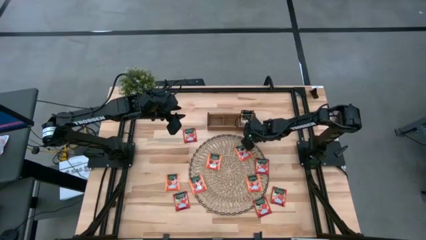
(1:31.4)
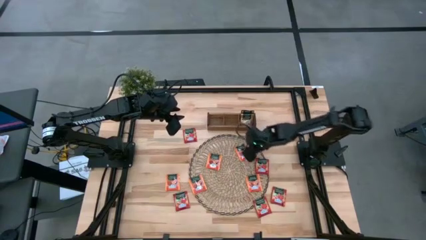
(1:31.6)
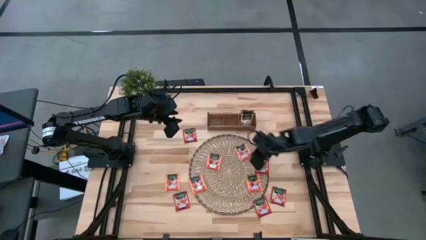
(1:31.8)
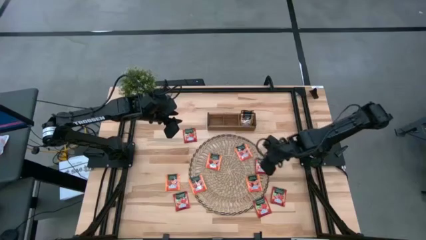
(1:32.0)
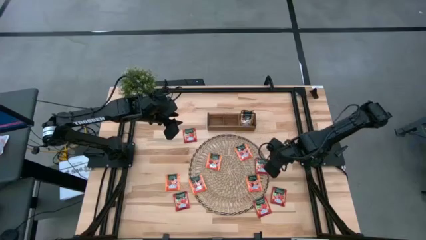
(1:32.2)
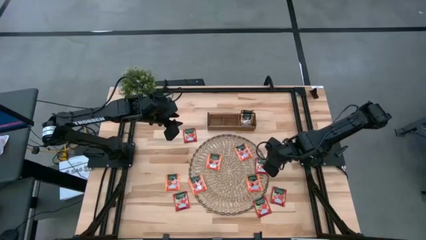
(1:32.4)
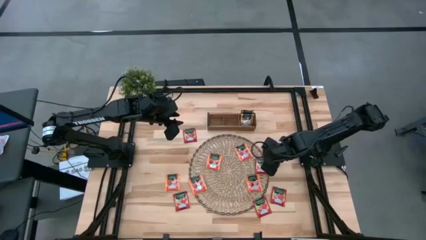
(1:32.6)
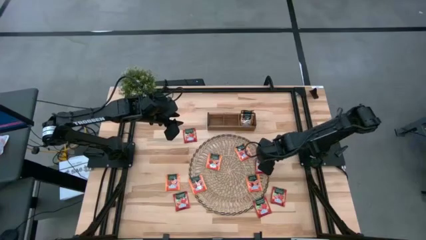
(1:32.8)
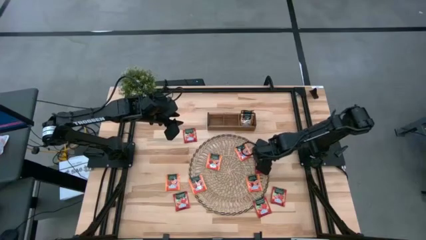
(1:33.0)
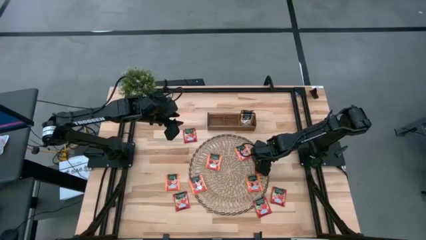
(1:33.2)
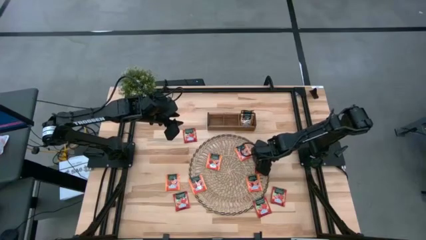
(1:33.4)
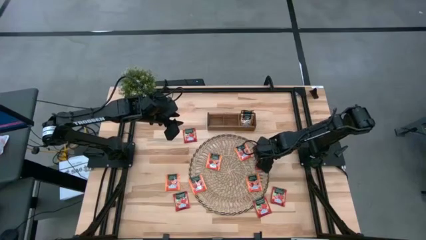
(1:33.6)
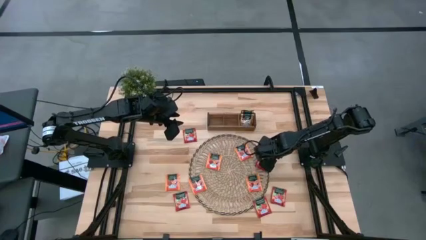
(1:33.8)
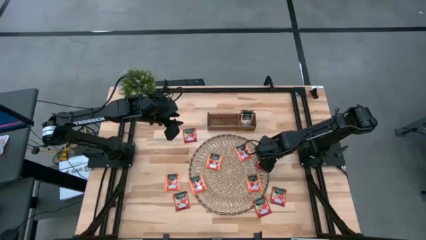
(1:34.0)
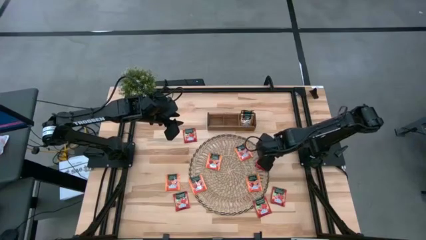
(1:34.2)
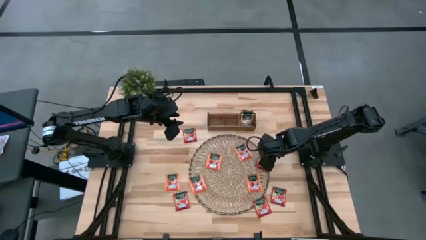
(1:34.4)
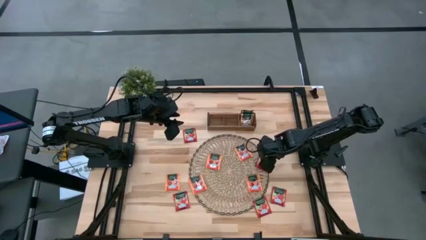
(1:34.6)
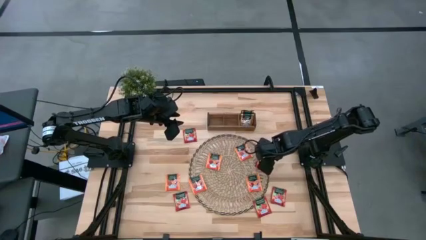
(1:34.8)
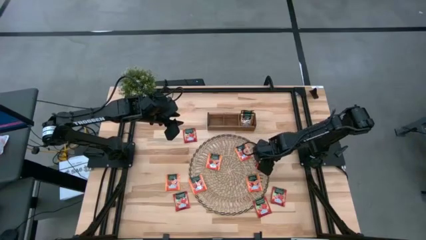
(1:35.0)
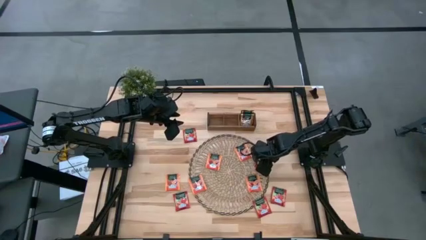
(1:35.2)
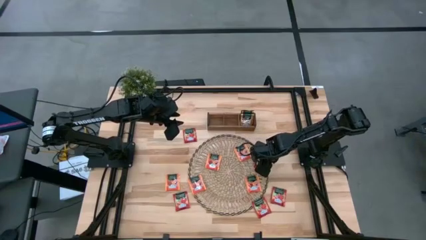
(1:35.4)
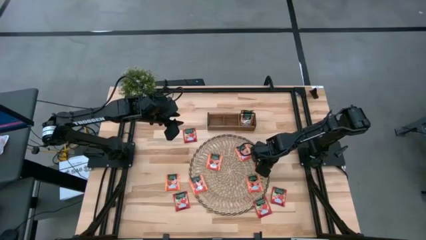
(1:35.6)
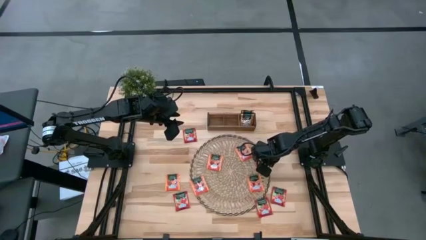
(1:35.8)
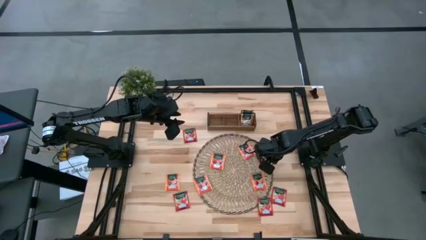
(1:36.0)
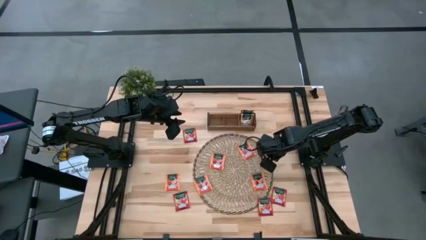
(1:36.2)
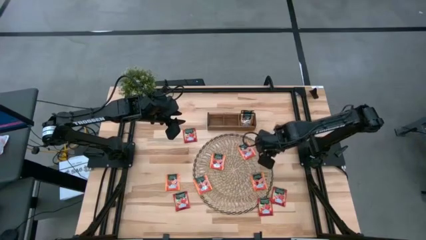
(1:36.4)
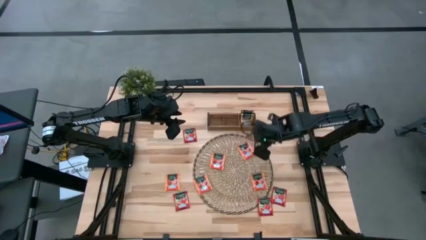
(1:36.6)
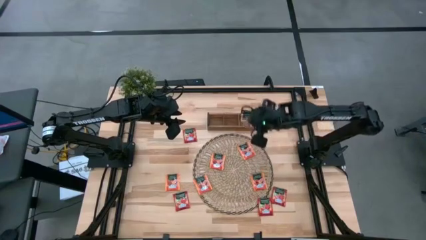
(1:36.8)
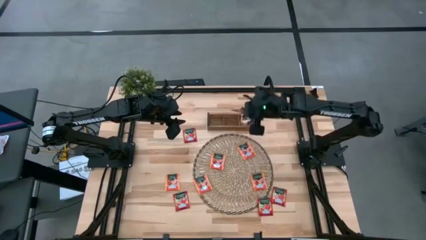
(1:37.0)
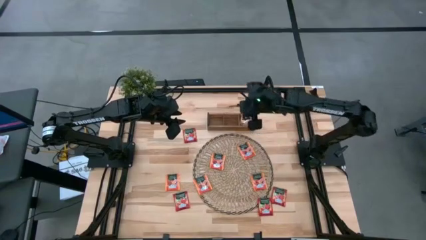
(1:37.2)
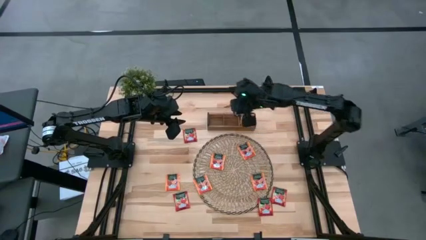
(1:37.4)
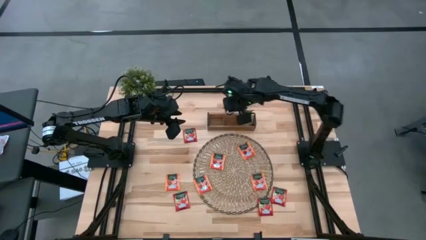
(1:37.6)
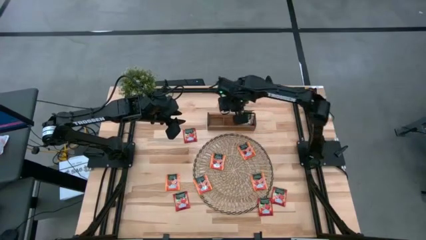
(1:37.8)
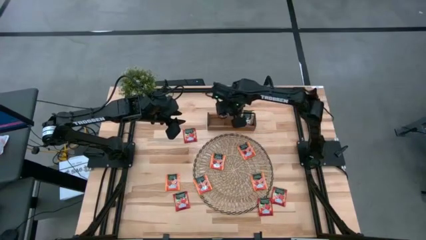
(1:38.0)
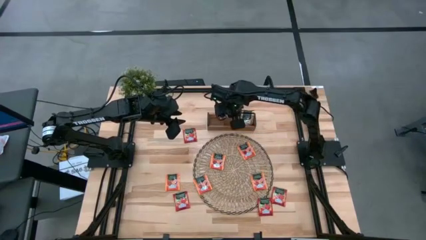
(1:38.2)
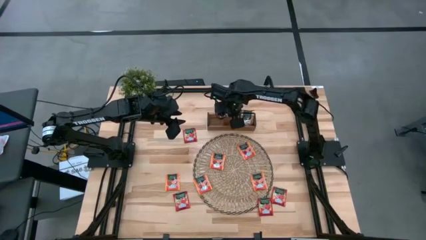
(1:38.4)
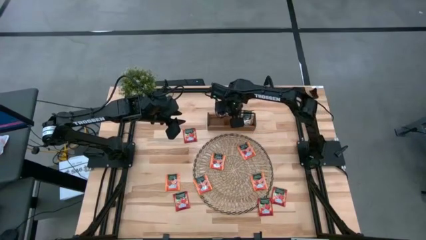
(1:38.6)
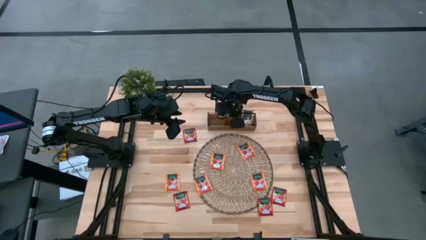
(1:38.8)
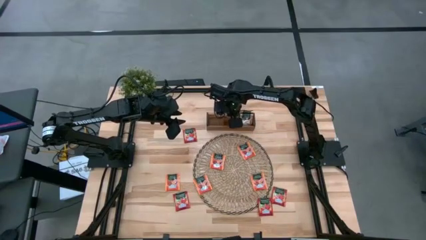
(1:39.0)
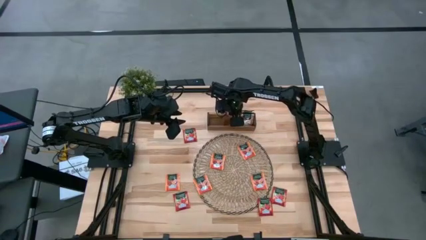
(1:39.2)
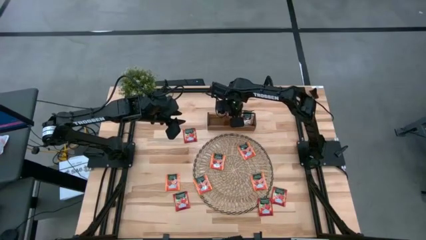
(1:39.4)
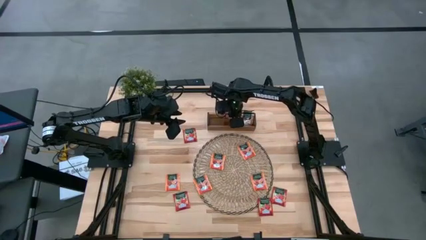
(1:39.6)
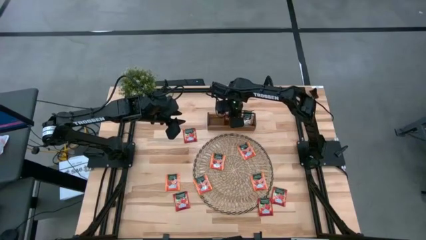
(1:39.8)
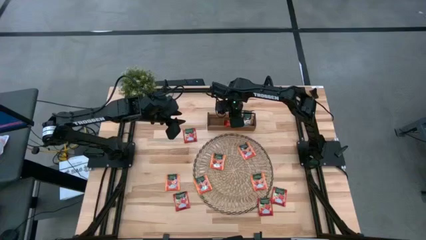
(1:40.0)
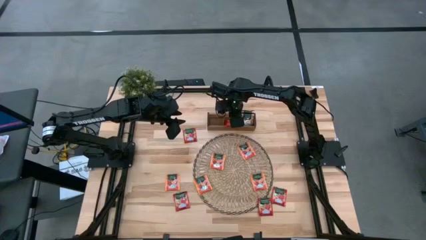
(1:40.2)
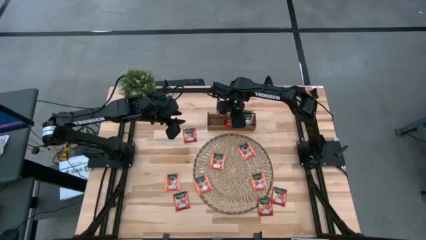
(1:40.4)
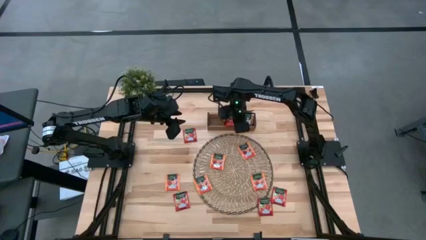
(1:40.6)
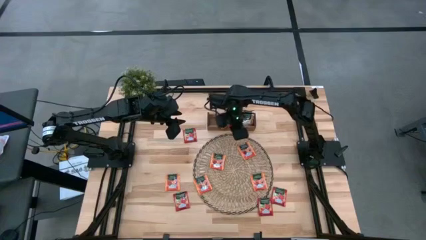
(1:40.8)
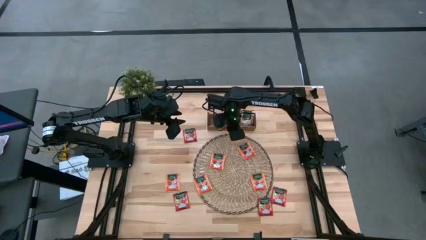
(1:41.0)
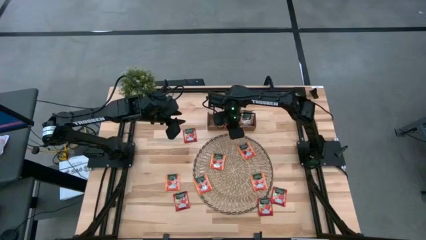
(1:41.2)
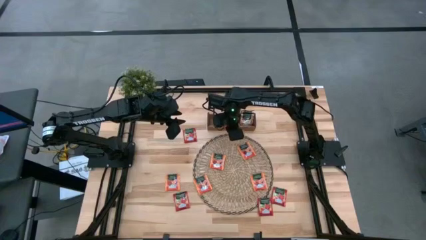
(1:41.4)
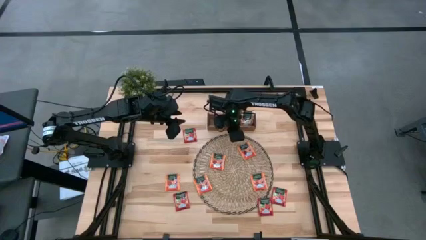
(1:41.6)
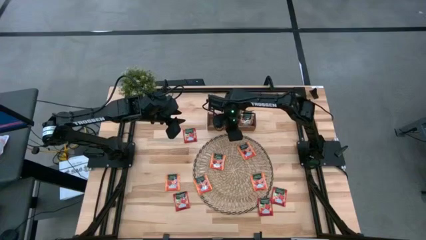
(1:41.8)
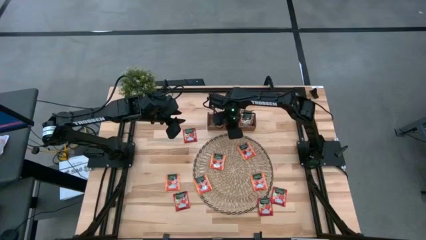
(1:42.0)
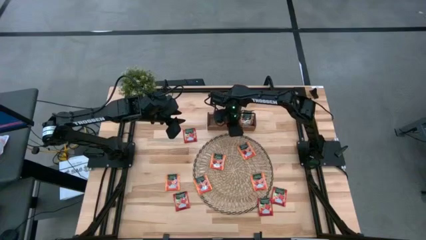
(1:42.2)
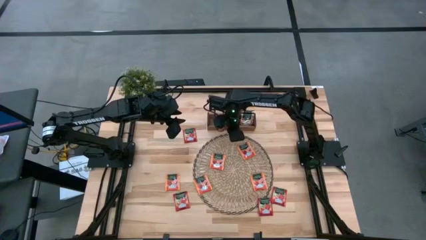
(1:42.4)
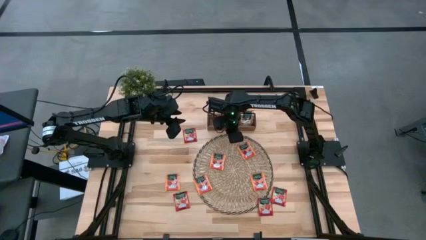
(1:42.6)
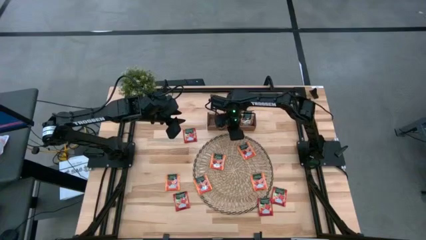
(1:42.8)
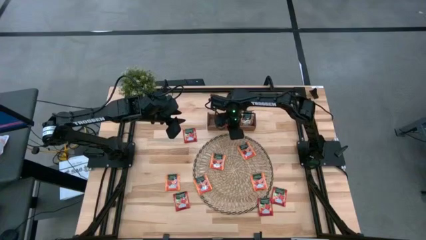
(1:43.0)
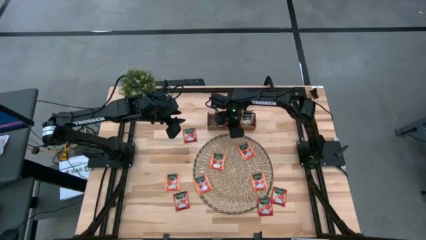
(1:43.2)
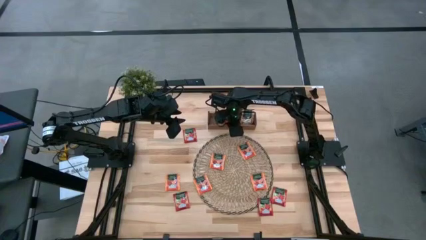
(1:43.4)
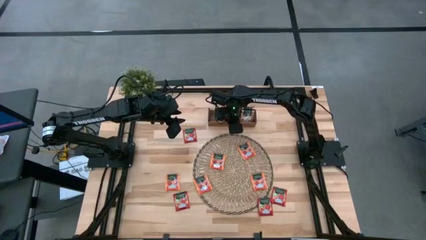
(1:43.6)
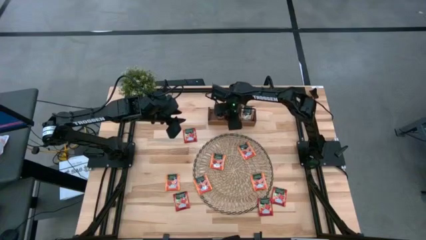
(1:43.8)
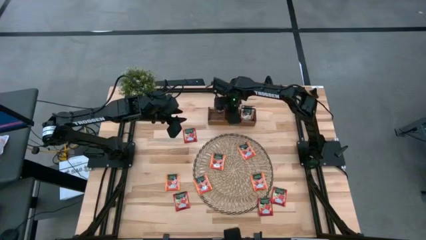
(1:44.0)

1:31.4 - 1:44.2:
Task: Pick & Place Tea
Put the red tea bag into the middle section of the wooden organizer
